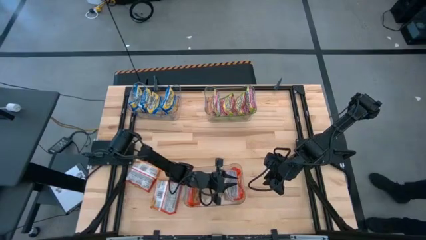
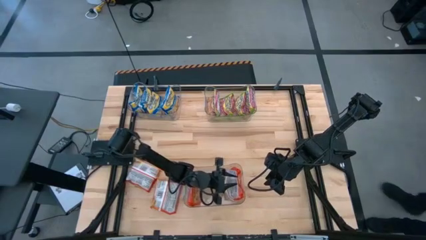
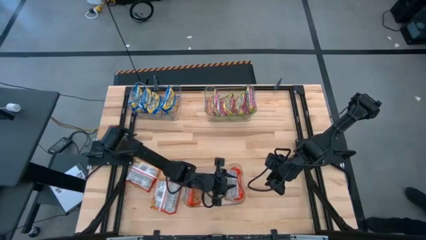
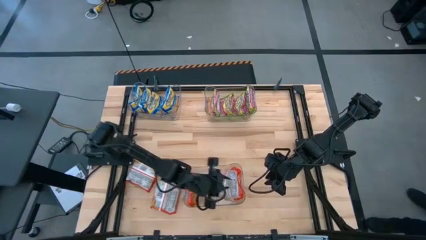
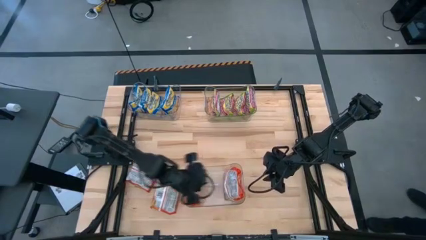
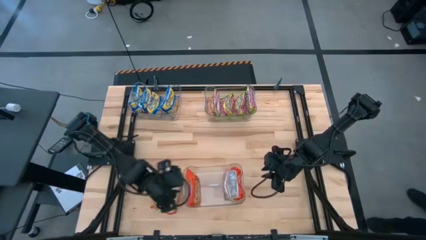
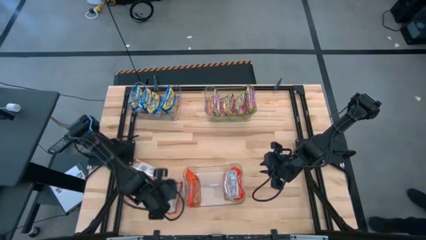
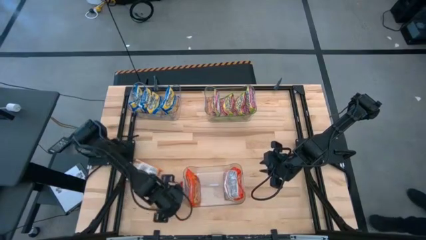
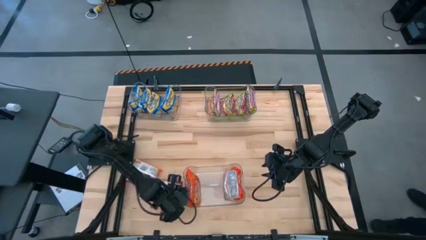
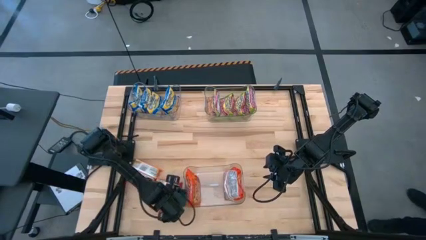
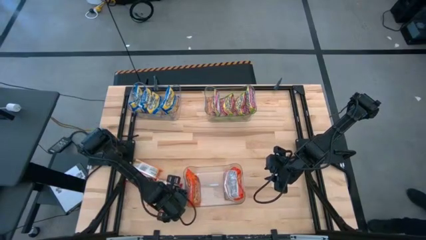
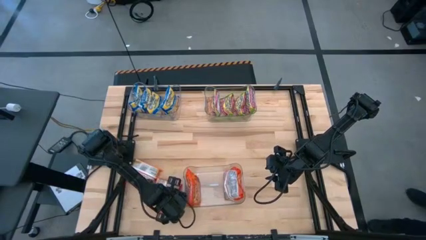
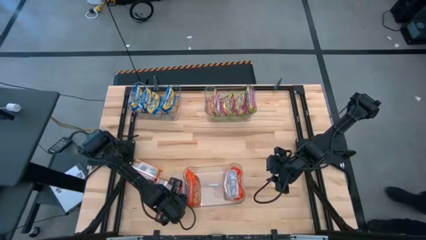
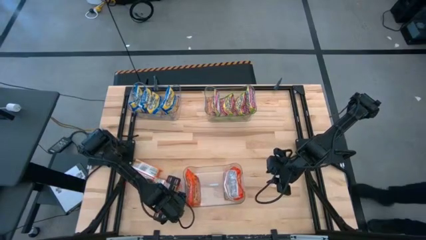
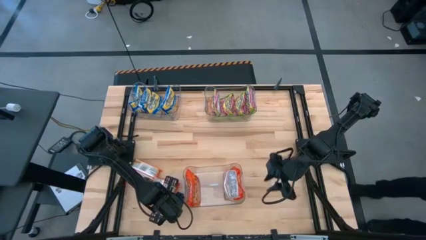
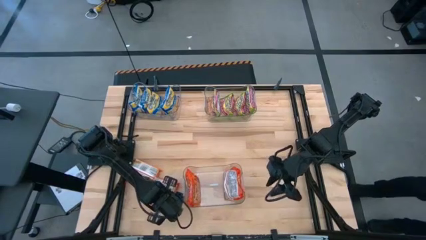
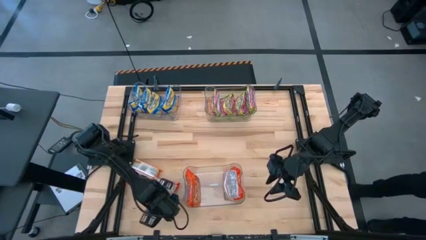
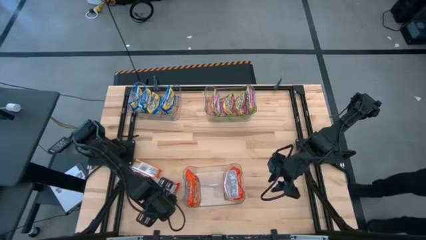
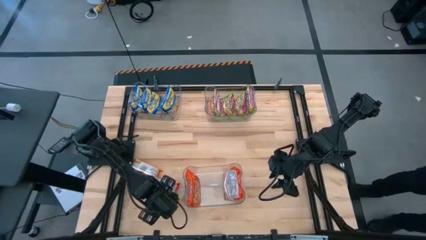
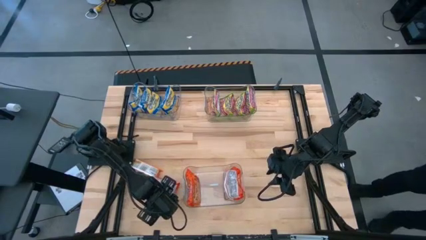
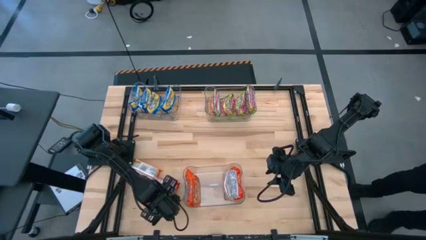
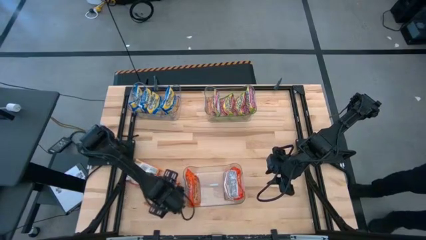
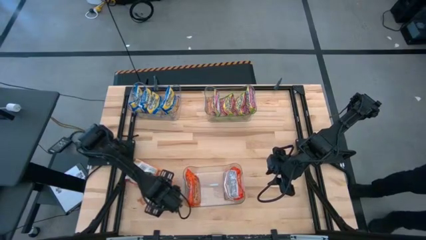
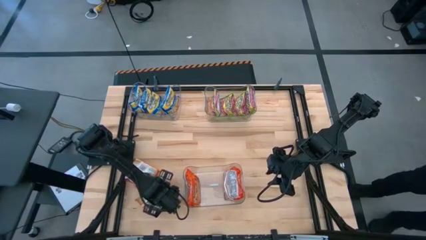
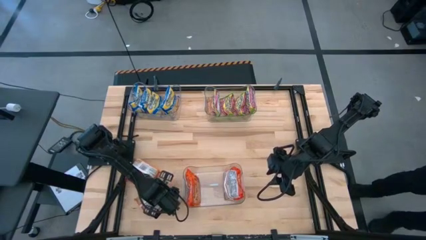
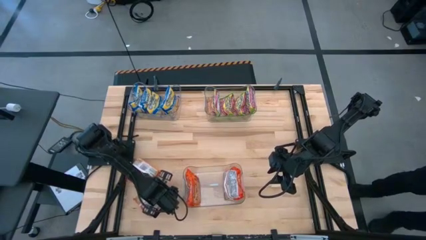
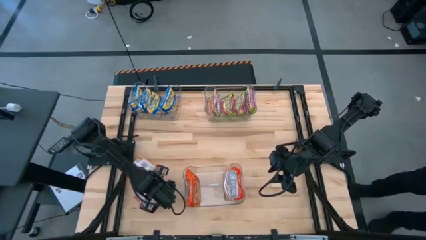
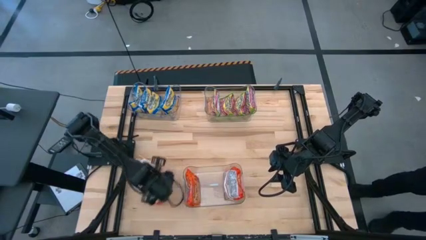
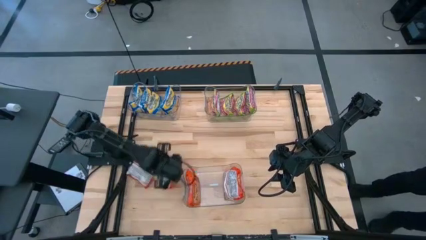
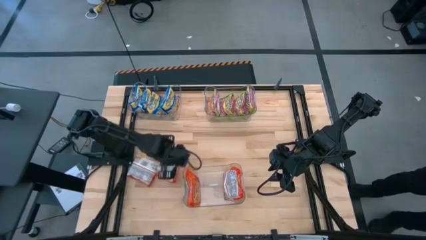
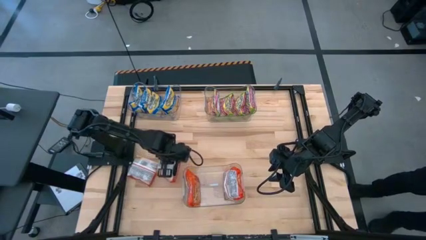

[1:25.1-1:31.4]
Task: Sort Maruchan noodles
Put the orange noodle pack into the bottom transparent bin

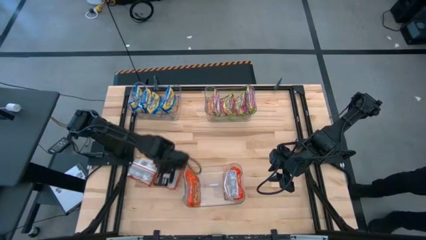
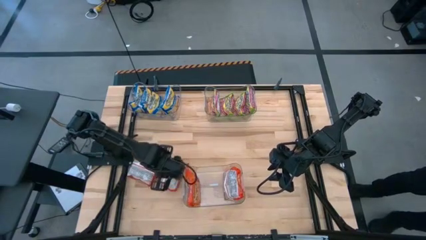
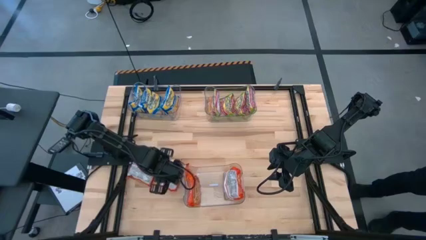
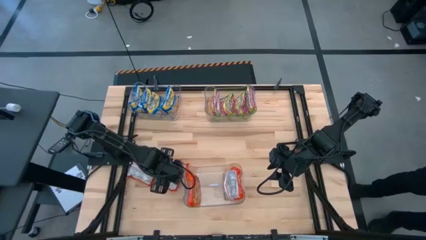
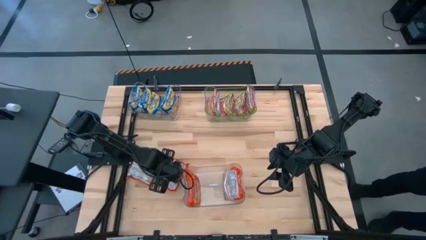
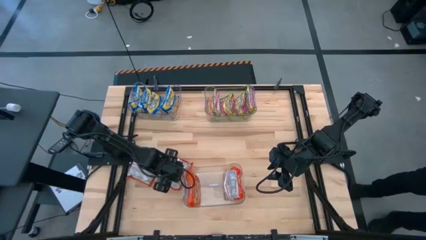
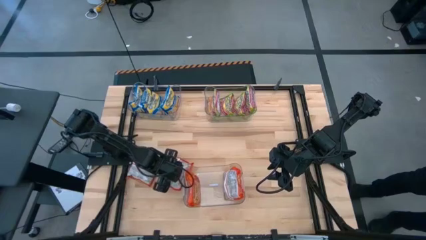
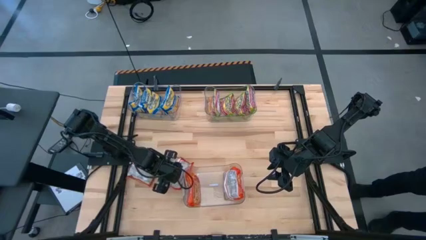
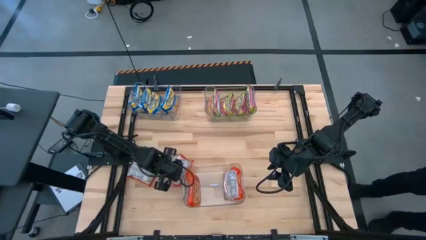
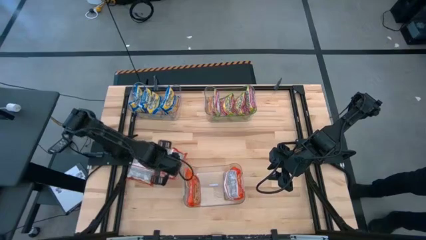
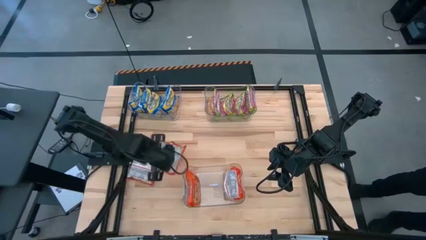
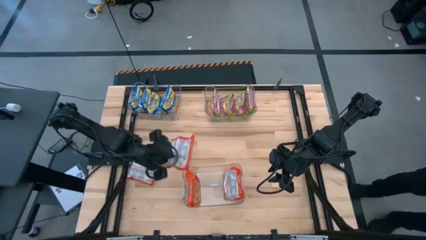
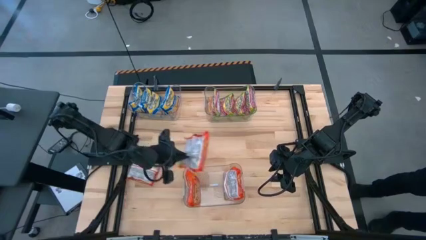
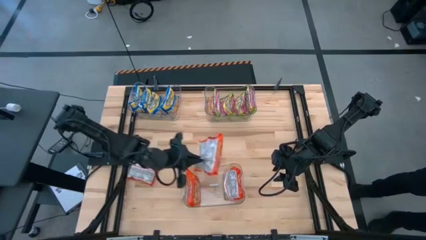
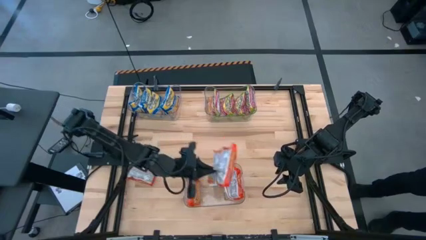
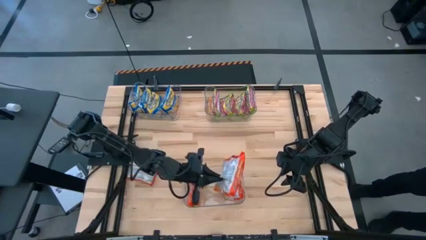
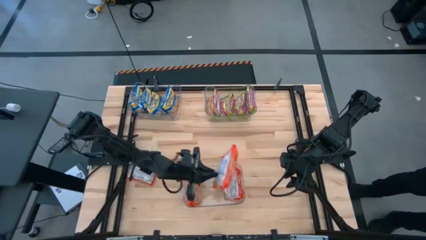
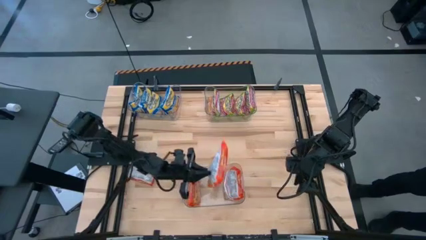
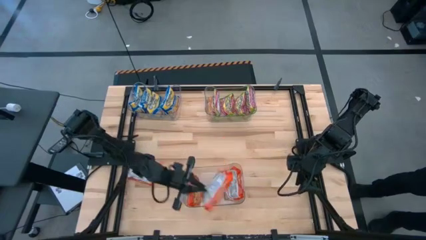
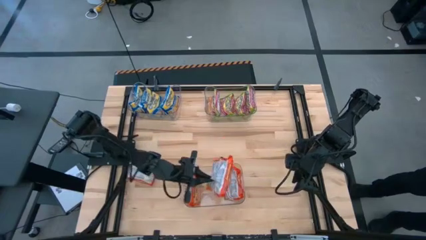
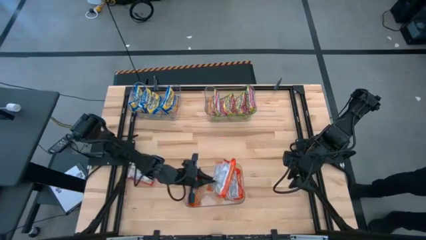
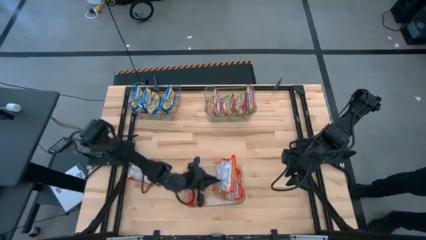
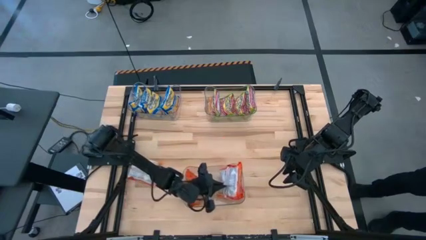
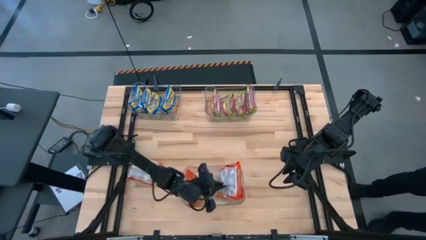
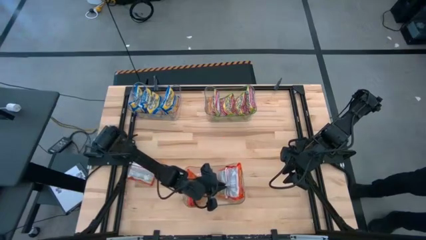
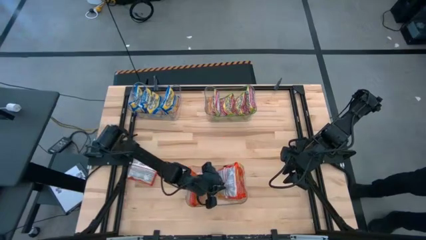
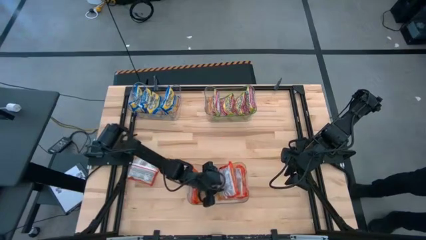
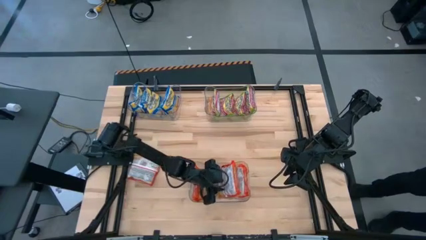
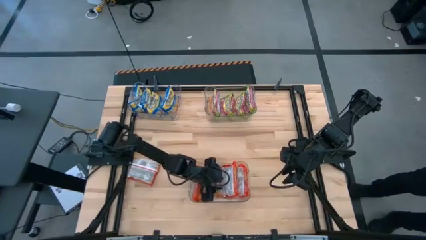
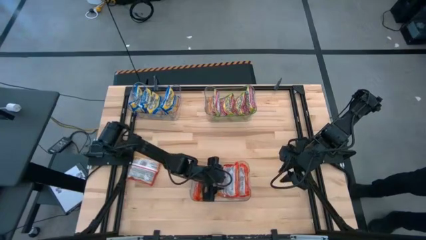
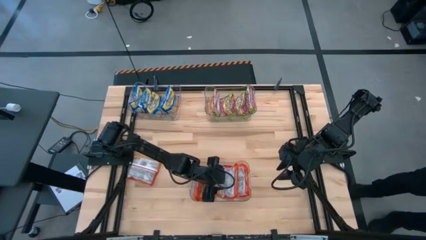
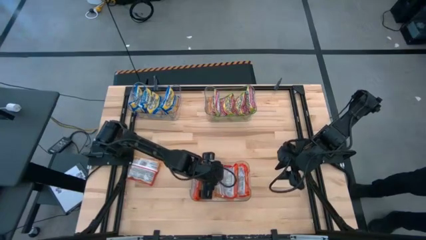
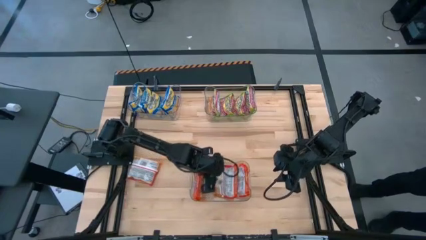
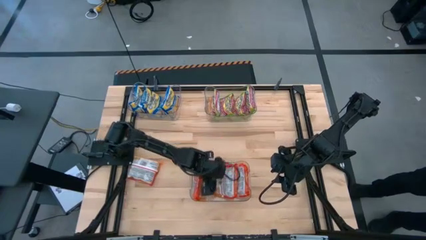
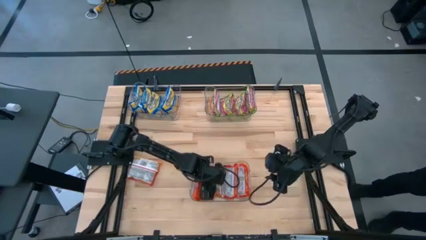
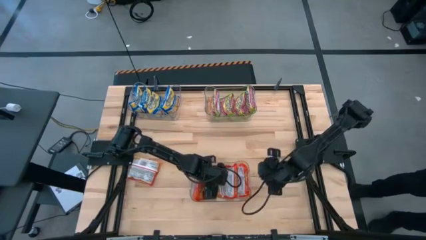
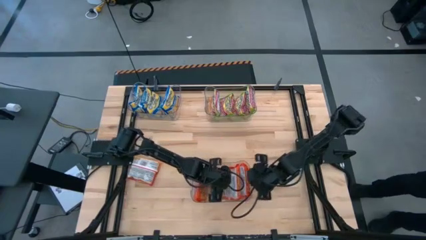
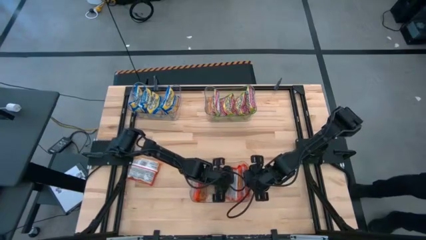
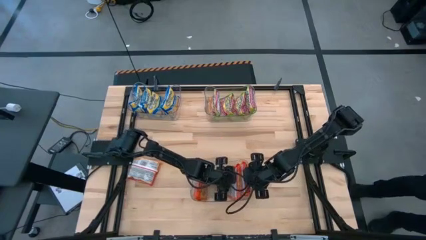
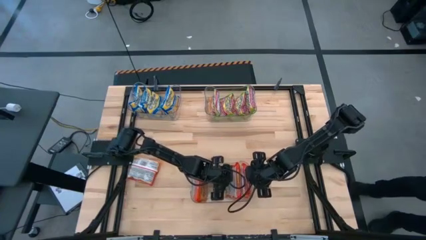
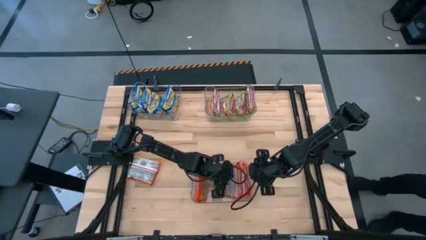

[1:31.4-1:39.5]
Put the orange noodle pack into the bottom transparent bin
